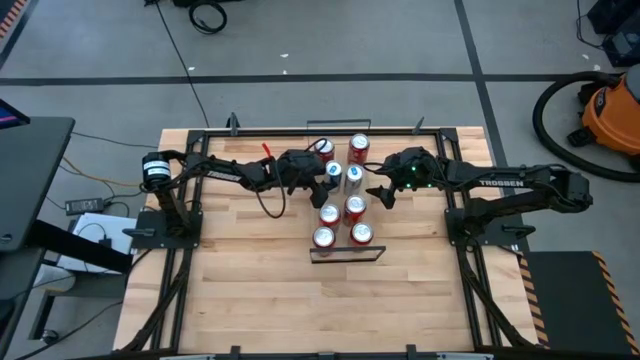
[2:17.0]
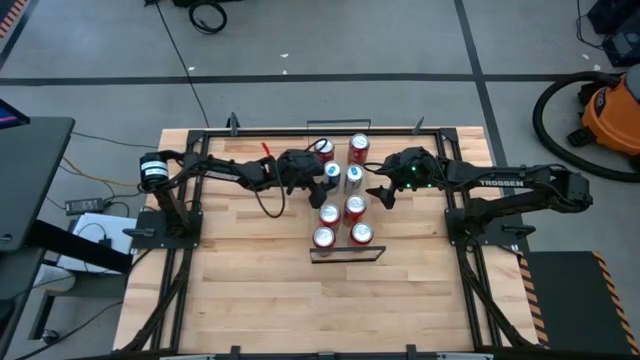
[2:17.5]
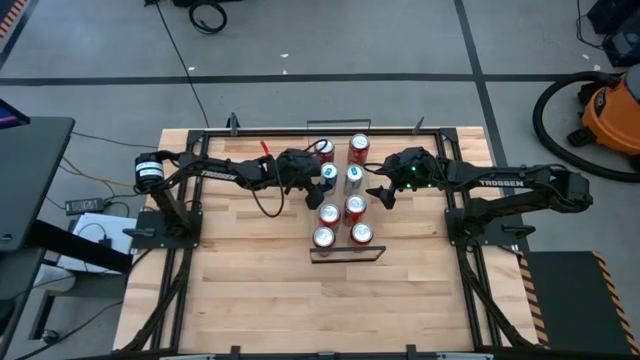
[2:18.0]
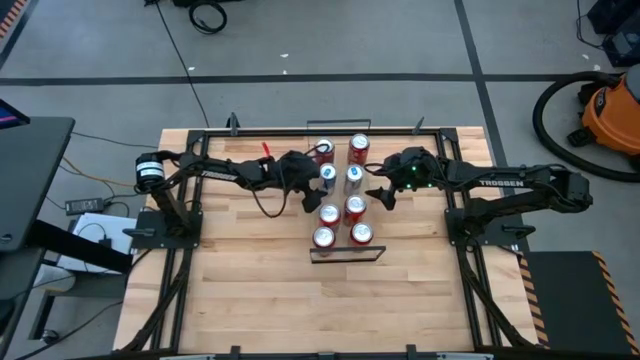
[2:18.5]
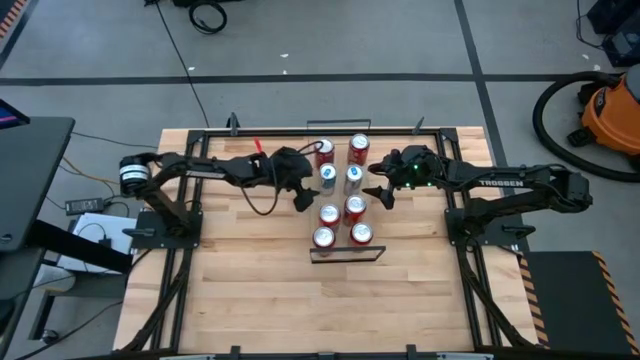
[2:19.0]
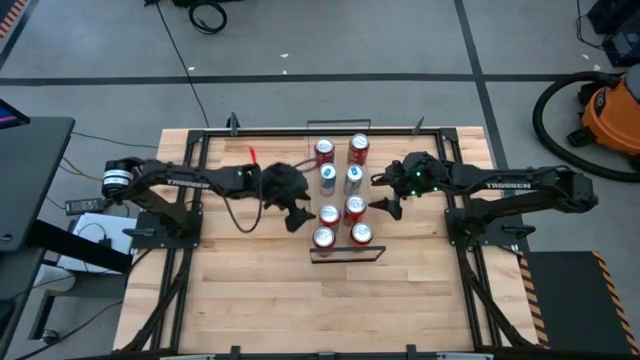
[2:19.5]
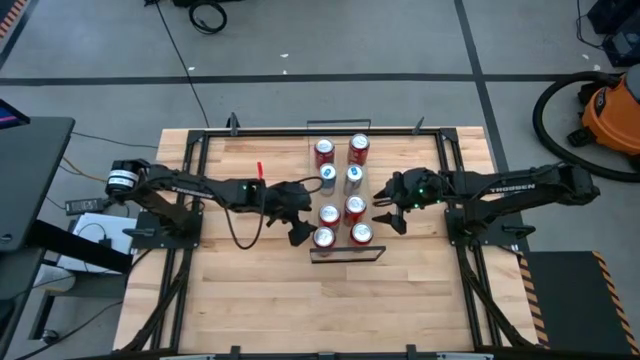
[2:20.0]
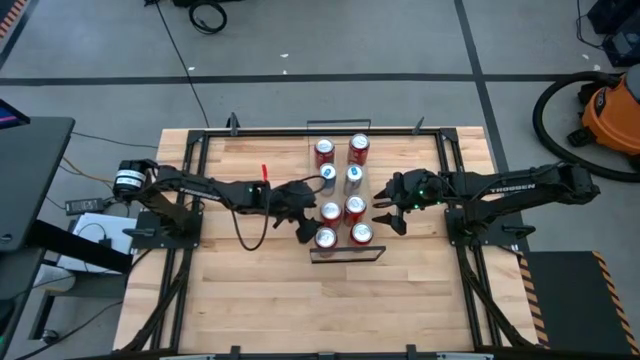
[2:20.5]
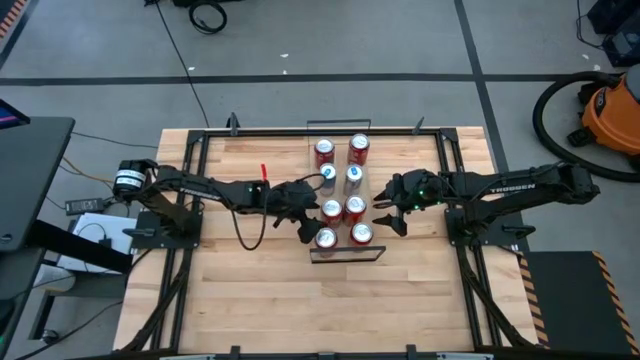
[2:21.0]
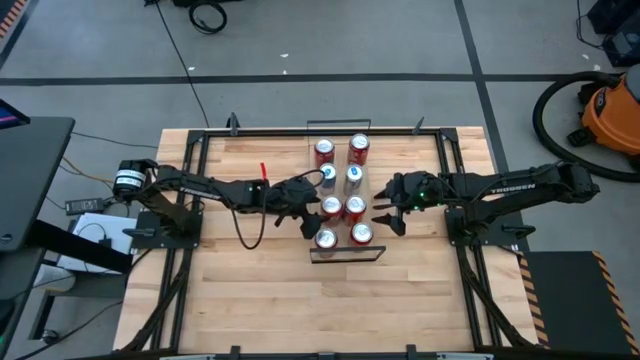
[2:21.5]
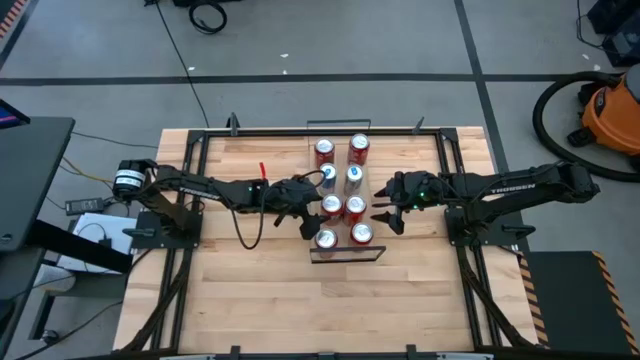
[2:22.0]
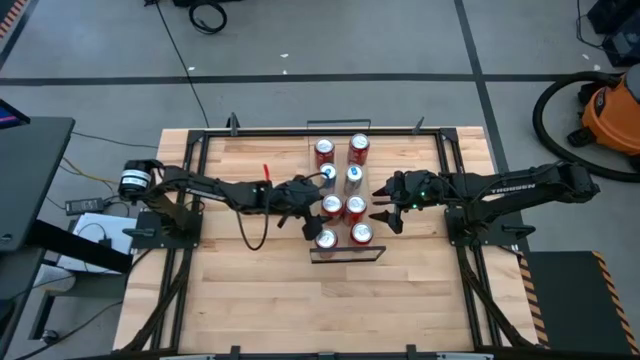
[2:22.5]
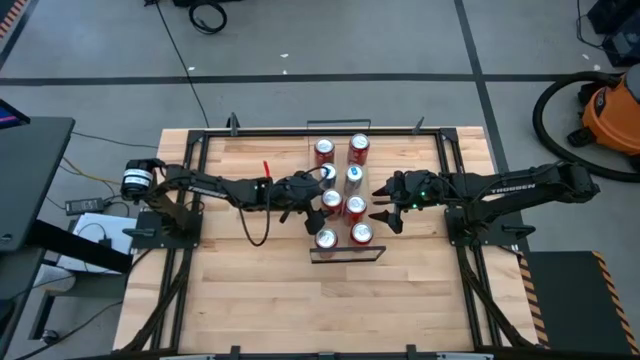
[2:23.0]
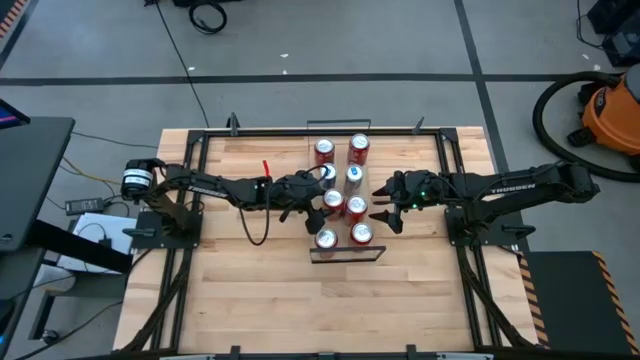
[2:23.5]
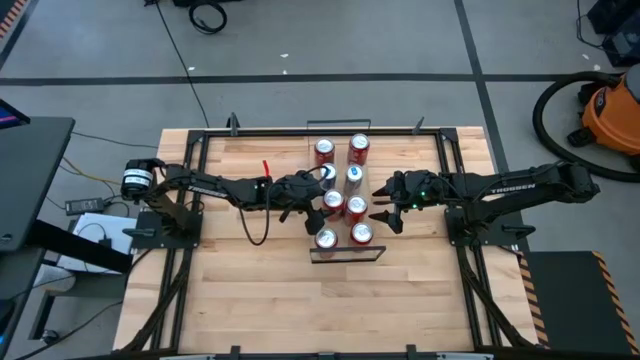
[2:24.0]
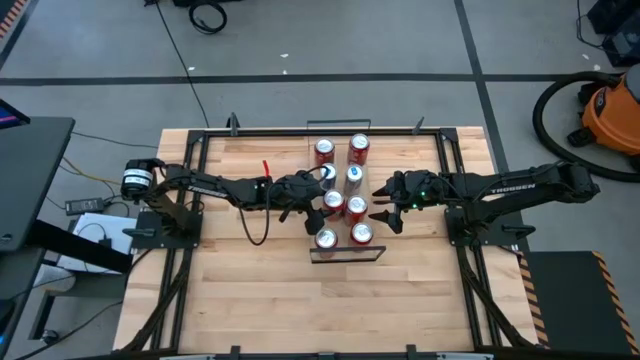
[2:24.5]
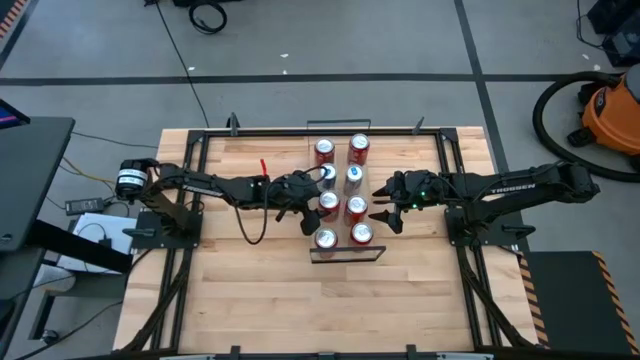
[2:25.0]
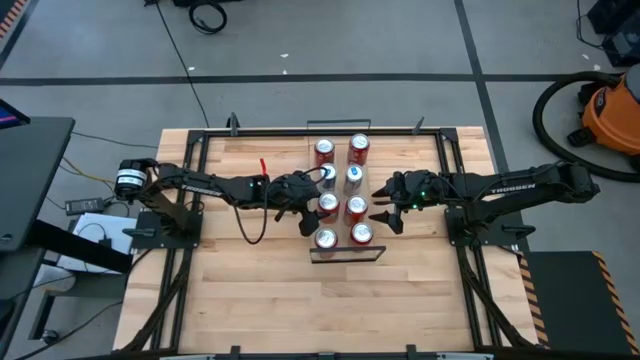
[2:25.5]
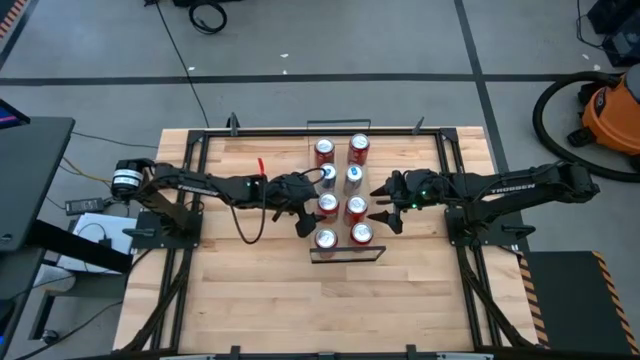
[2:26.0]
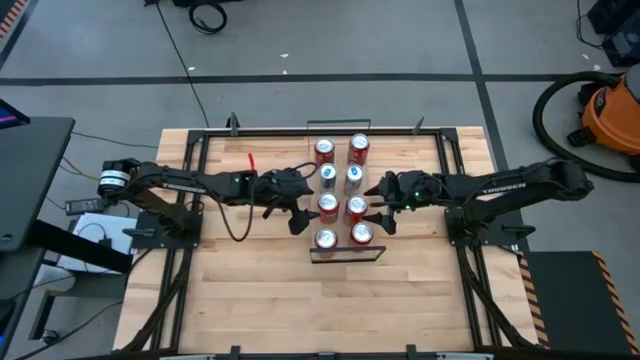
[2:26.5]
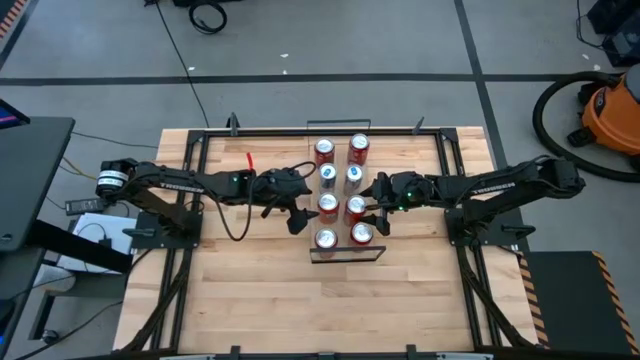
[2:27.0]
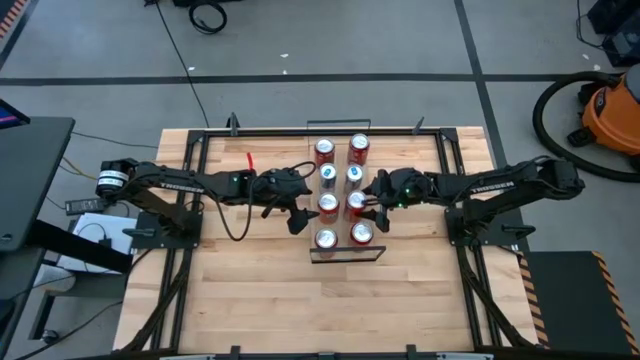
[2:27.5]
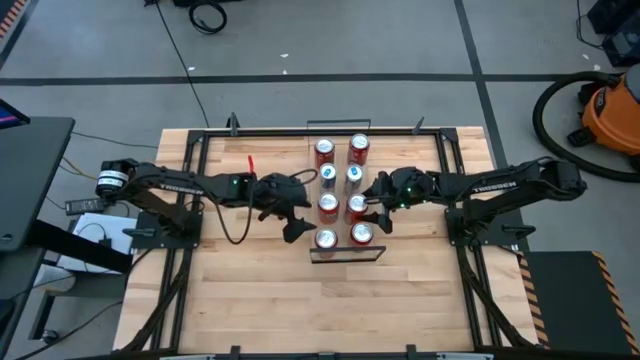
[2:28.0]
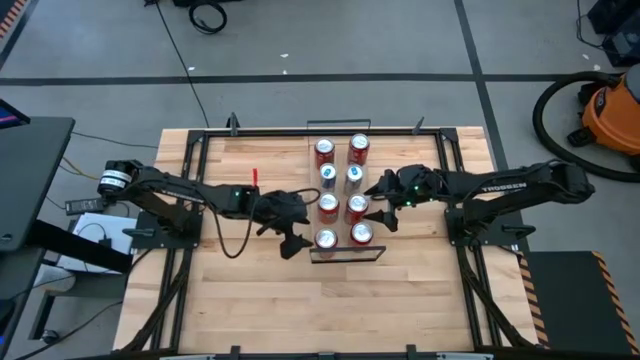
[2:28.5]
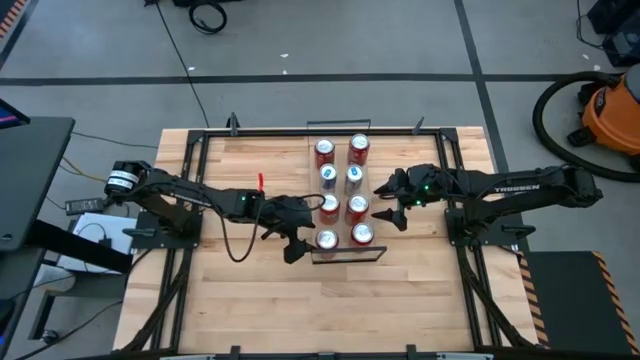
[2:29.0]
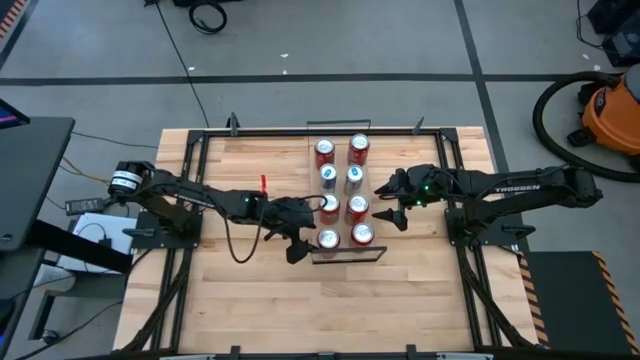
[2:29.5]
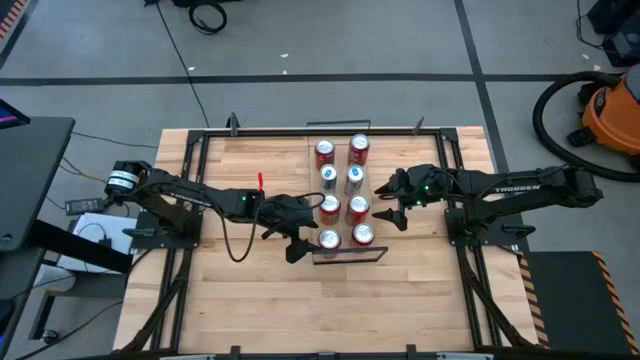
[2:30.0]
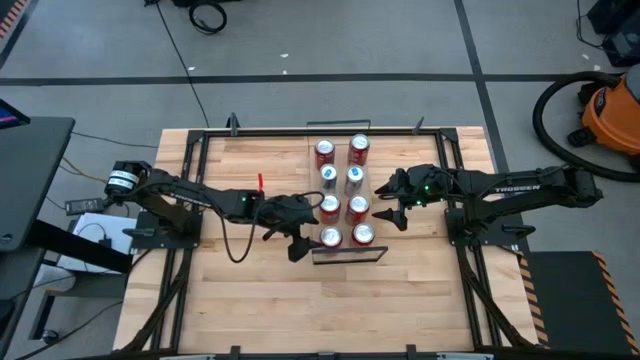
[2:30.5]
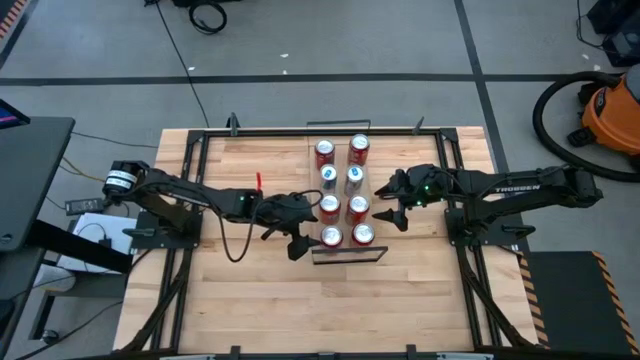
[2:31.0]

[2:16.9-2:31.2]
Task: Place canned beverage on shelf
Adjust the soda cans on the shelf

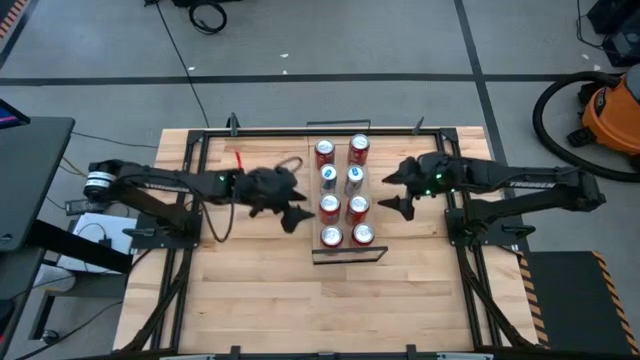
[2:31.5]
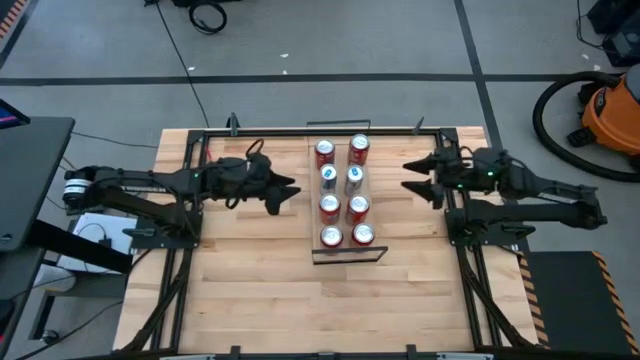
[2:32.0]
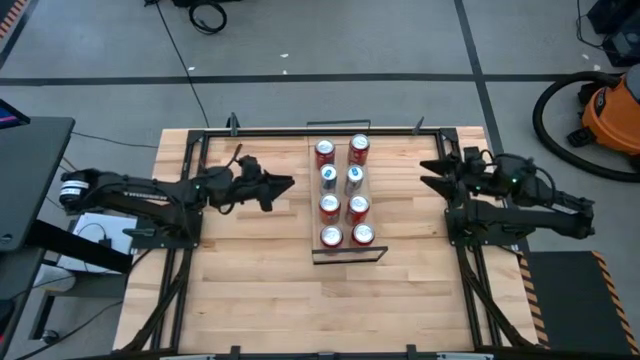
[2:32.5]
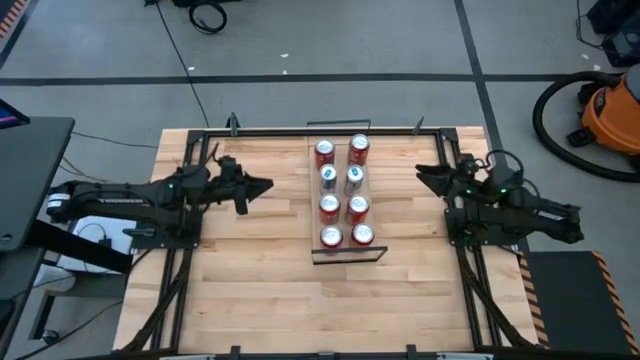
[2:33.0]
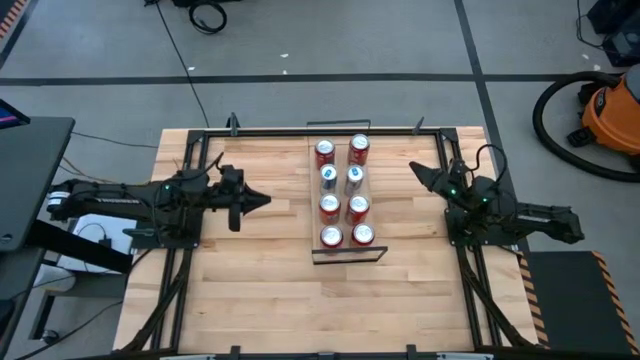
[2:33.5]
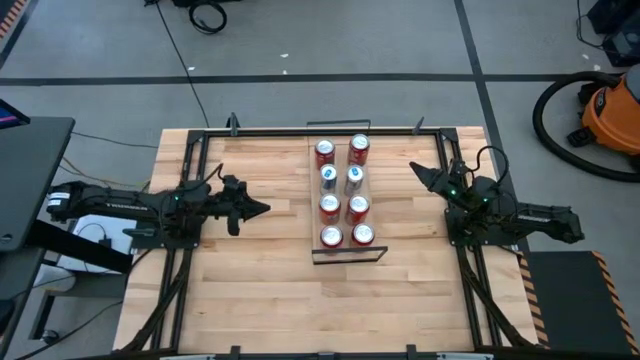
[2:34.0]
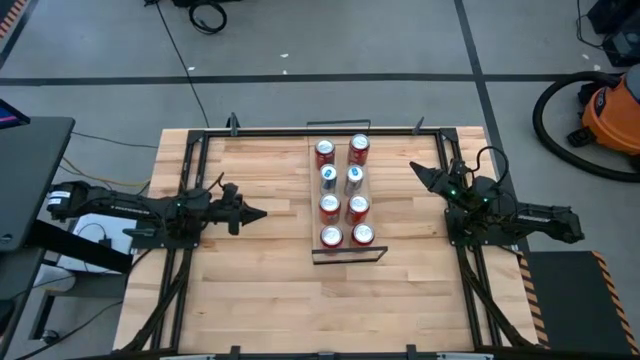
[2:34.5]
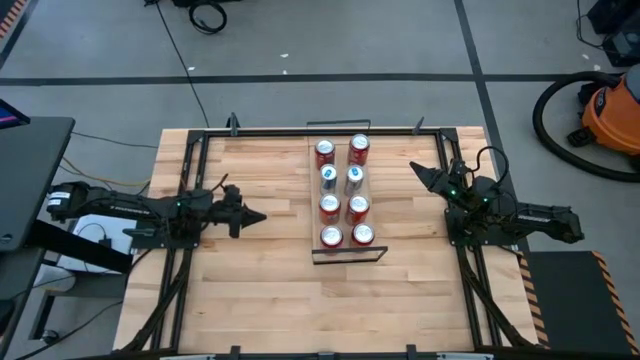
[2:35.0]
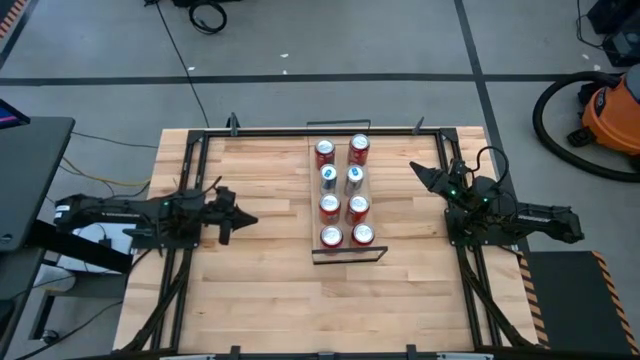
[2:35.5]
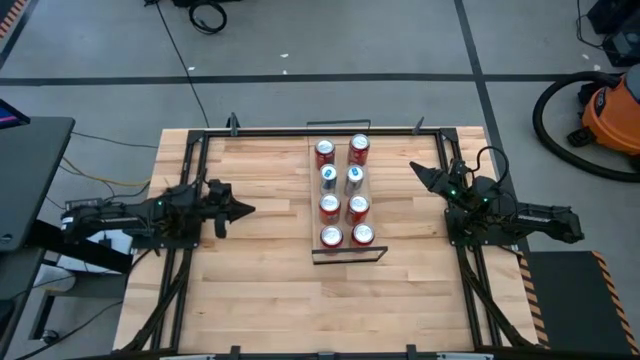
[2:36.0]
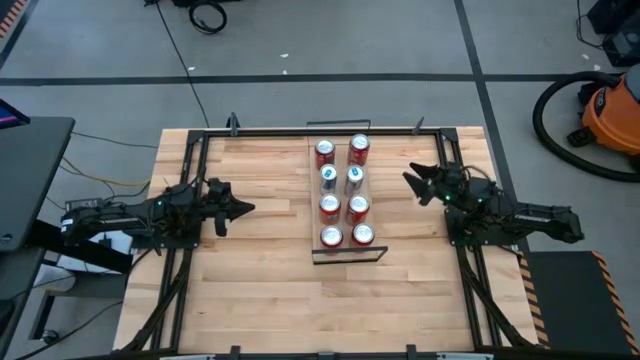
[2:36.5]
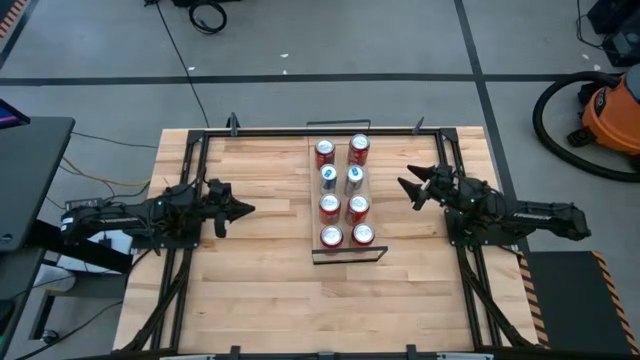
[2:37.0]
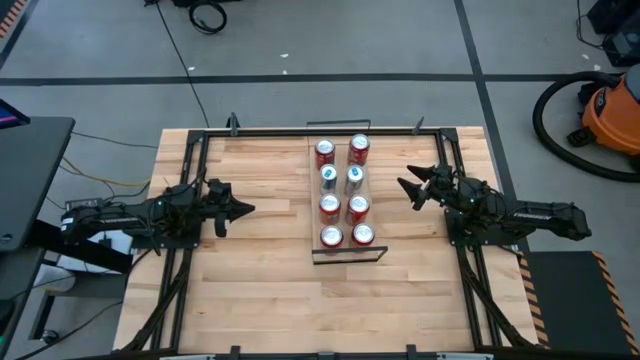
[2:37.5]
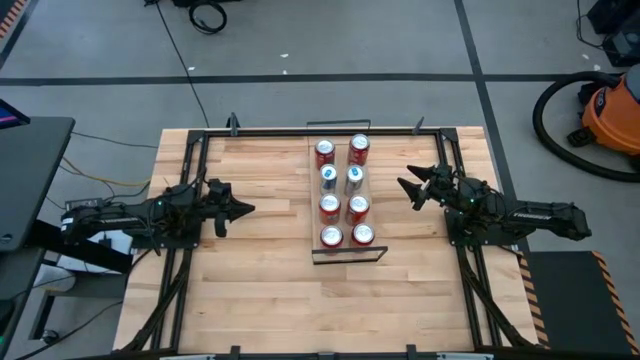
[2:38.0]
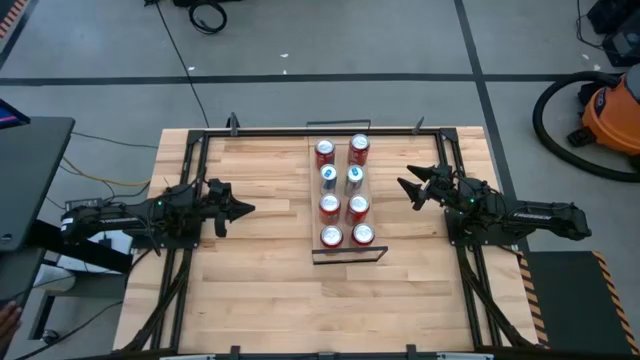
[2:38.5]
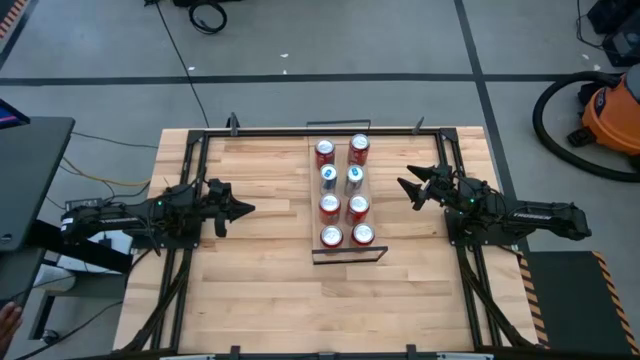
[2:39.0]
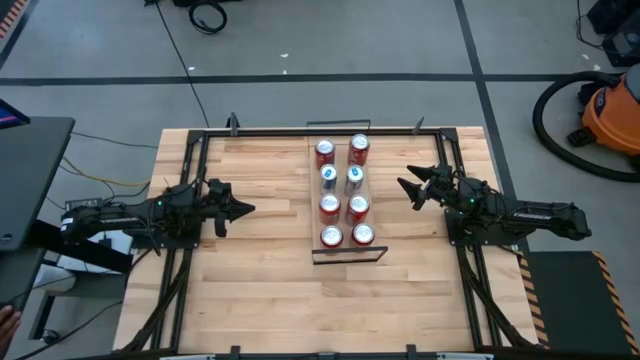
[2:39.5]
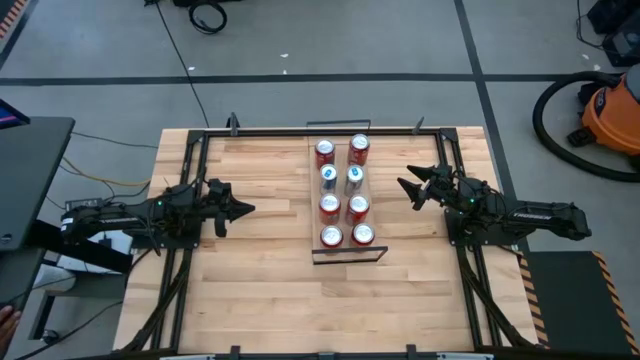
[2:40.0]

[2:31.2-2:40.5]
Return to Home Position
